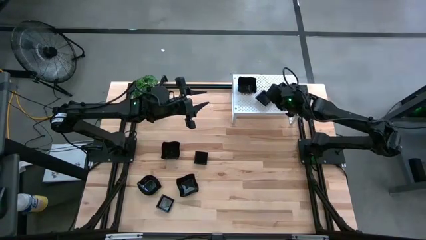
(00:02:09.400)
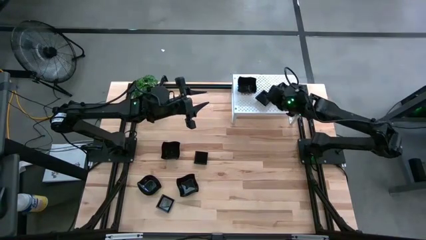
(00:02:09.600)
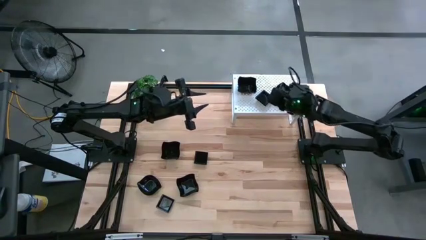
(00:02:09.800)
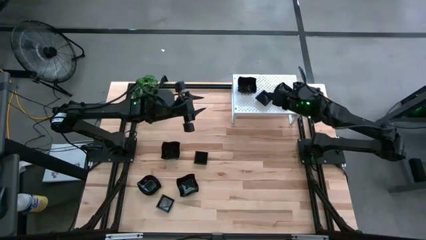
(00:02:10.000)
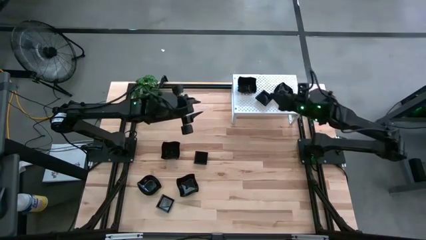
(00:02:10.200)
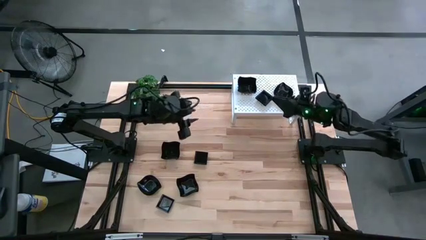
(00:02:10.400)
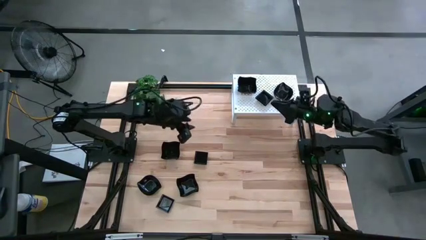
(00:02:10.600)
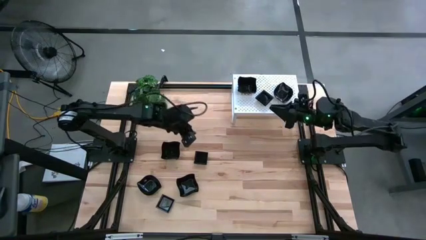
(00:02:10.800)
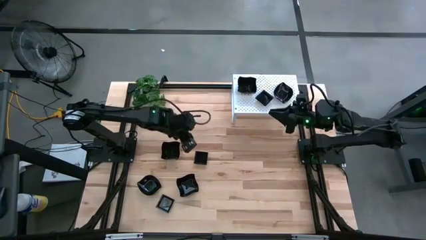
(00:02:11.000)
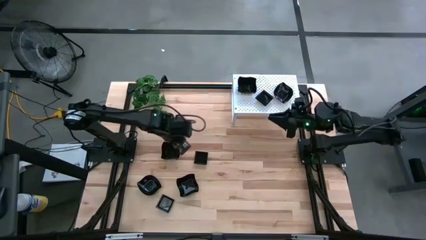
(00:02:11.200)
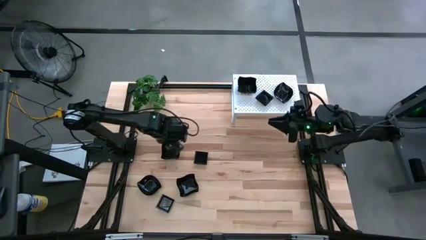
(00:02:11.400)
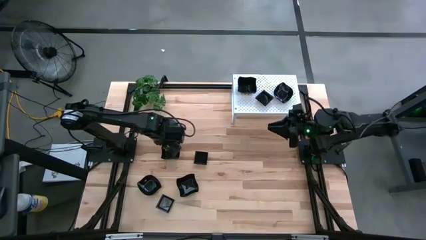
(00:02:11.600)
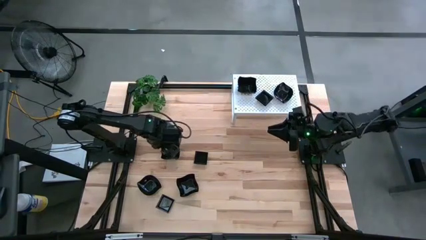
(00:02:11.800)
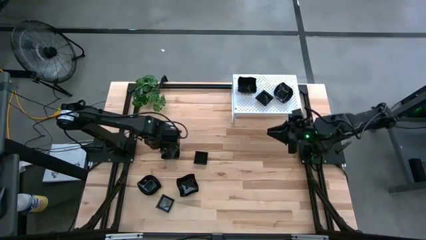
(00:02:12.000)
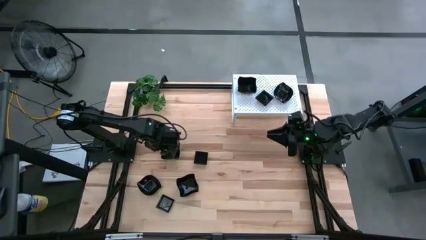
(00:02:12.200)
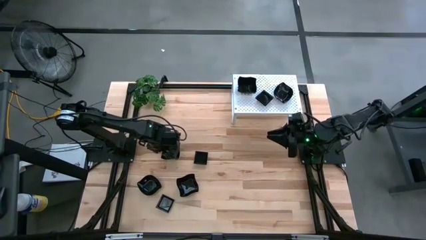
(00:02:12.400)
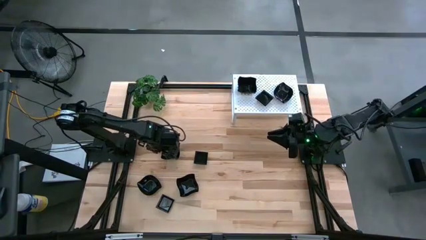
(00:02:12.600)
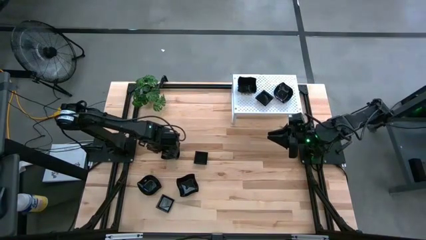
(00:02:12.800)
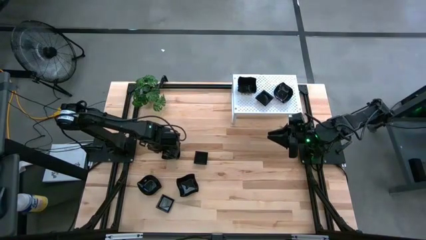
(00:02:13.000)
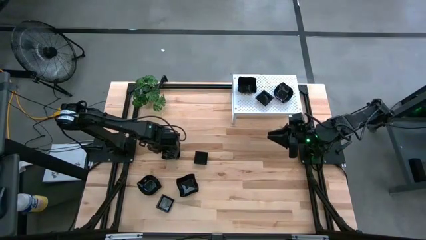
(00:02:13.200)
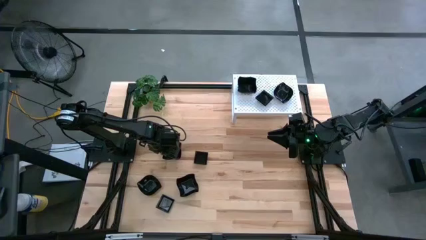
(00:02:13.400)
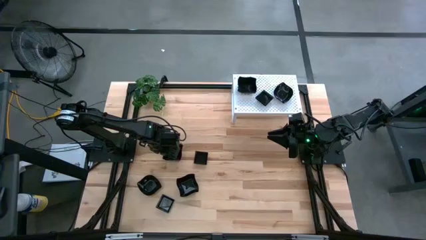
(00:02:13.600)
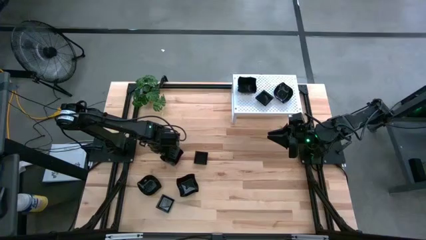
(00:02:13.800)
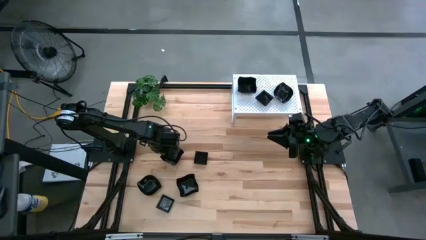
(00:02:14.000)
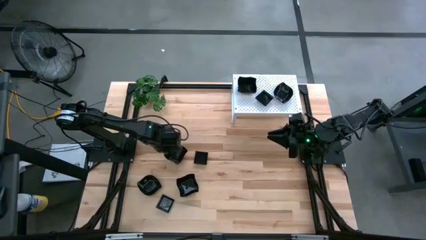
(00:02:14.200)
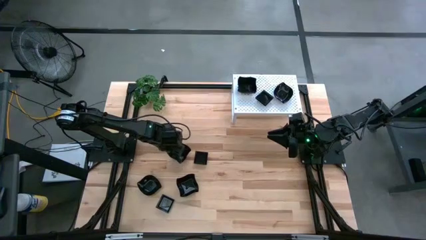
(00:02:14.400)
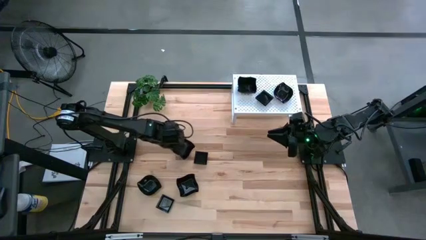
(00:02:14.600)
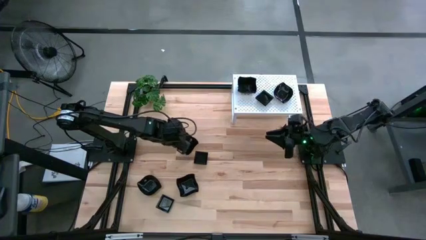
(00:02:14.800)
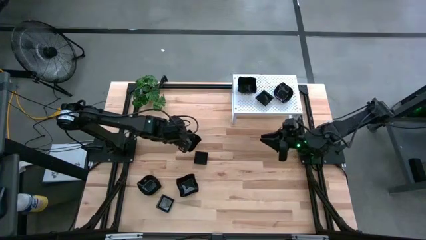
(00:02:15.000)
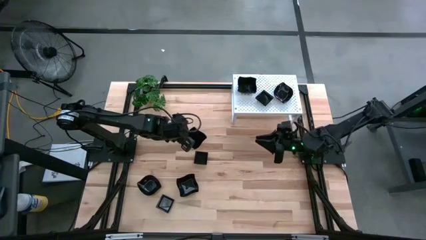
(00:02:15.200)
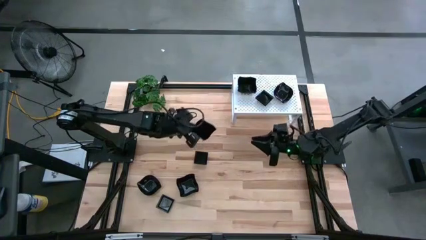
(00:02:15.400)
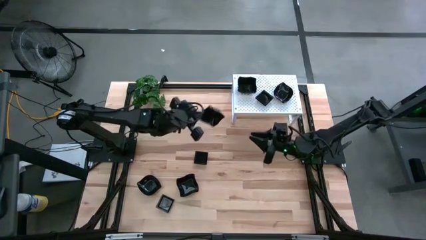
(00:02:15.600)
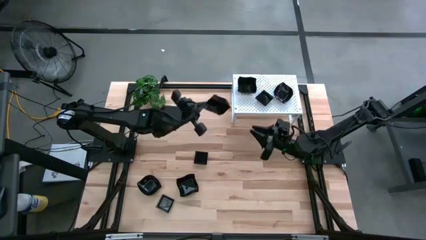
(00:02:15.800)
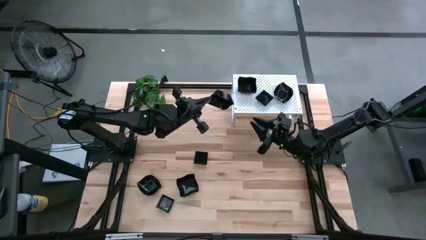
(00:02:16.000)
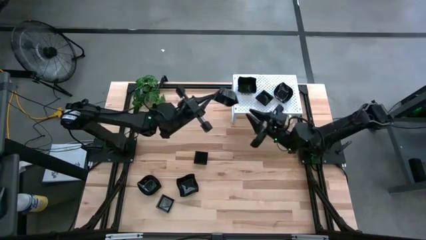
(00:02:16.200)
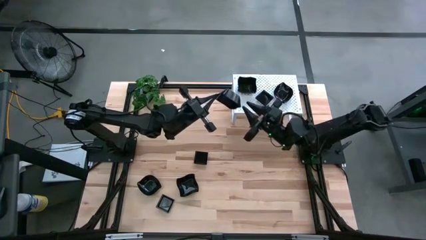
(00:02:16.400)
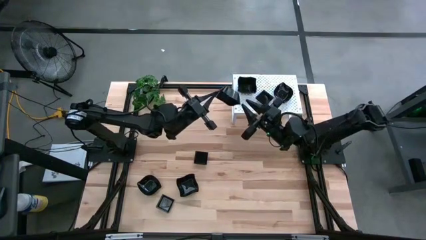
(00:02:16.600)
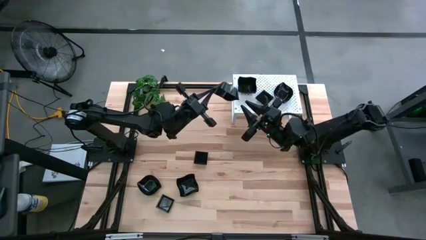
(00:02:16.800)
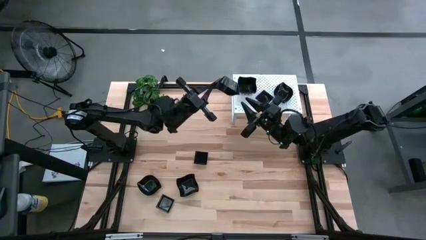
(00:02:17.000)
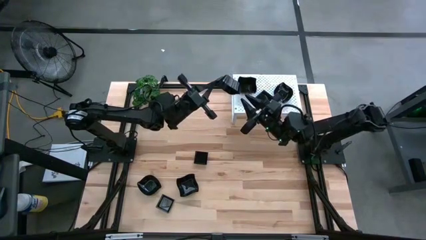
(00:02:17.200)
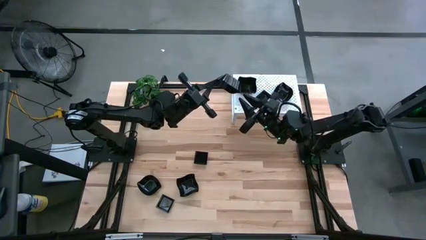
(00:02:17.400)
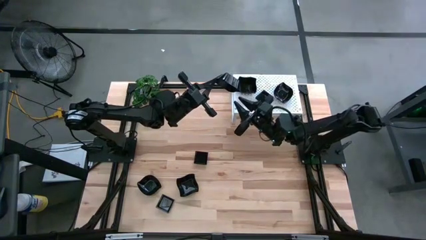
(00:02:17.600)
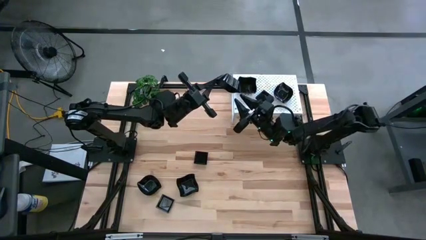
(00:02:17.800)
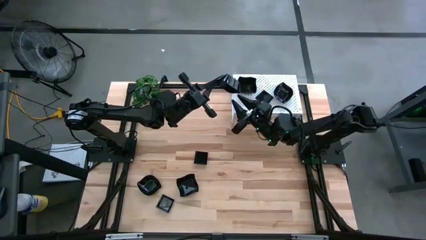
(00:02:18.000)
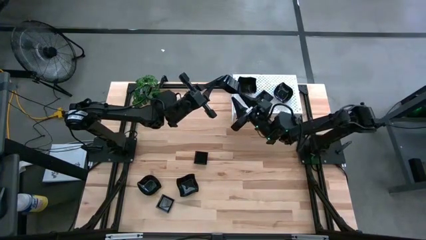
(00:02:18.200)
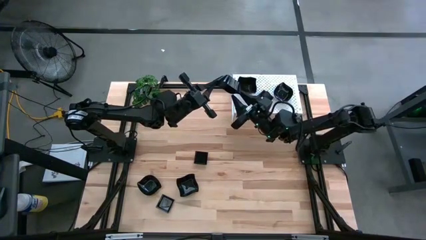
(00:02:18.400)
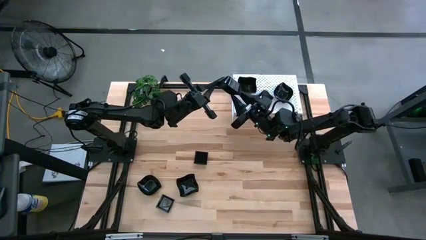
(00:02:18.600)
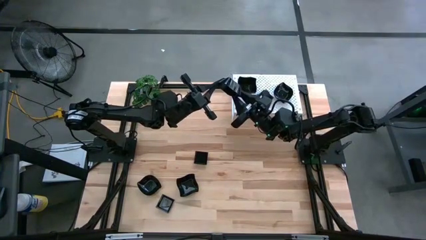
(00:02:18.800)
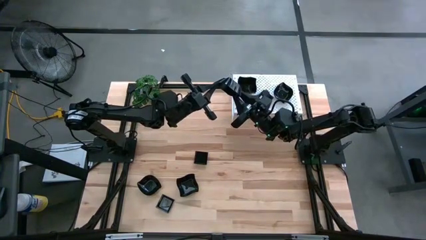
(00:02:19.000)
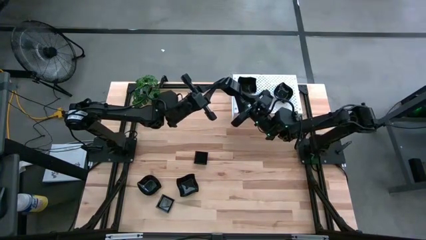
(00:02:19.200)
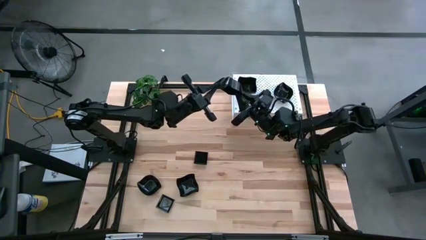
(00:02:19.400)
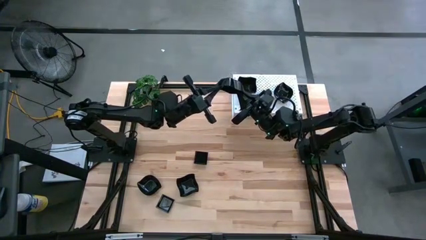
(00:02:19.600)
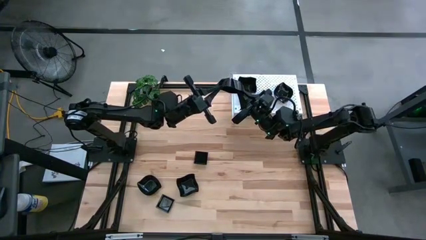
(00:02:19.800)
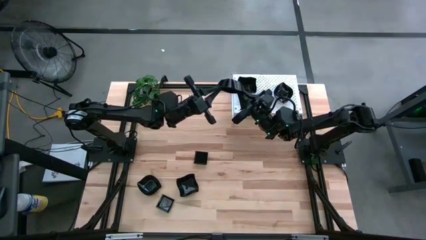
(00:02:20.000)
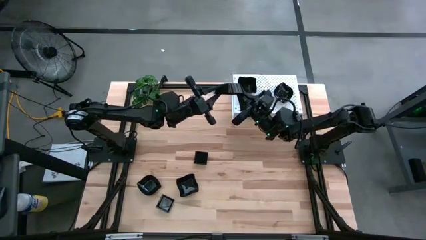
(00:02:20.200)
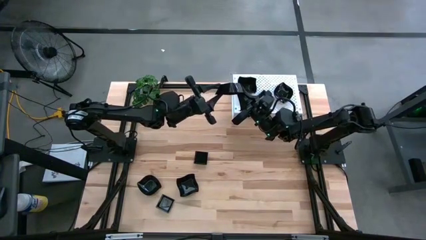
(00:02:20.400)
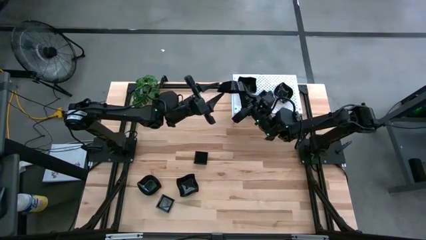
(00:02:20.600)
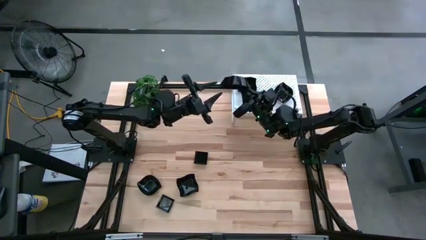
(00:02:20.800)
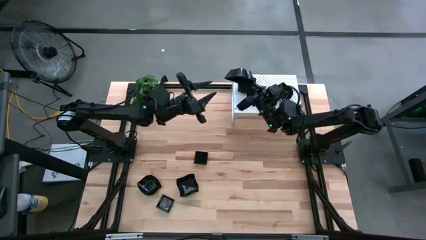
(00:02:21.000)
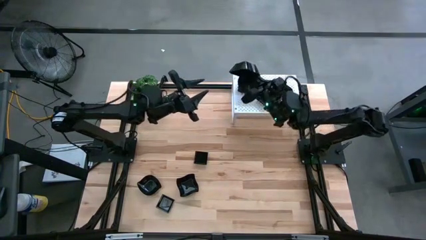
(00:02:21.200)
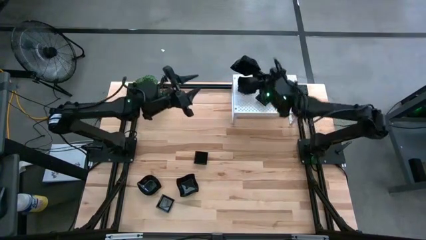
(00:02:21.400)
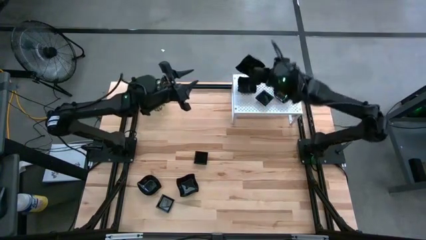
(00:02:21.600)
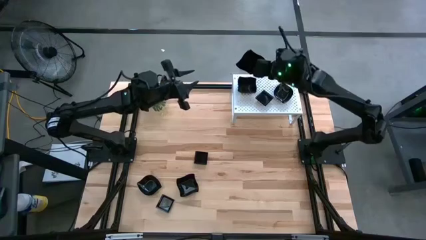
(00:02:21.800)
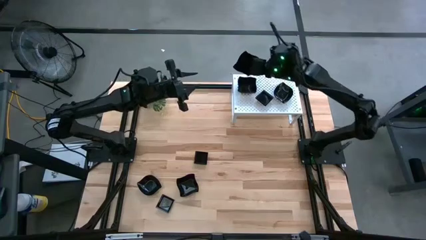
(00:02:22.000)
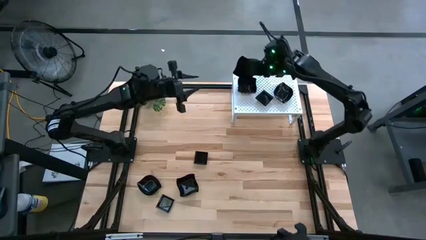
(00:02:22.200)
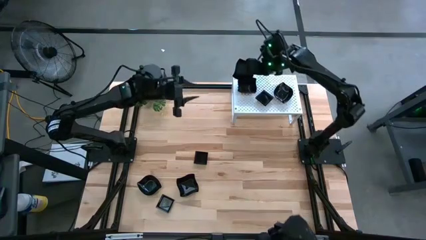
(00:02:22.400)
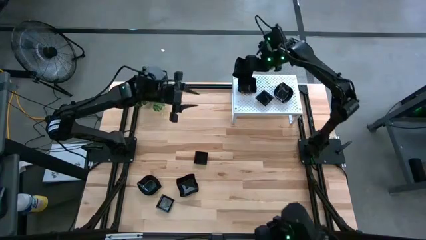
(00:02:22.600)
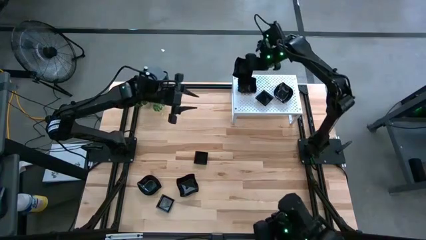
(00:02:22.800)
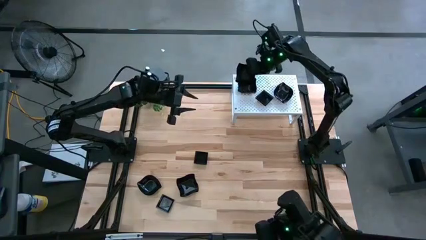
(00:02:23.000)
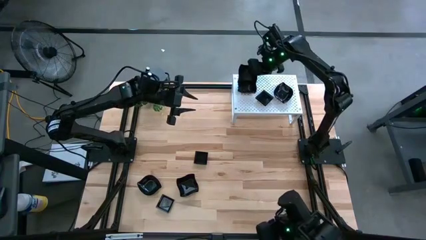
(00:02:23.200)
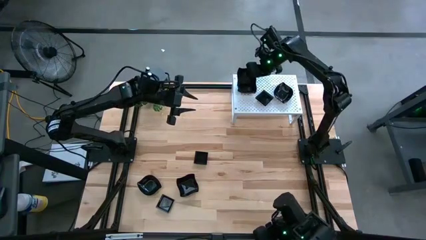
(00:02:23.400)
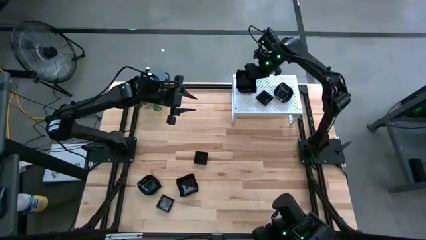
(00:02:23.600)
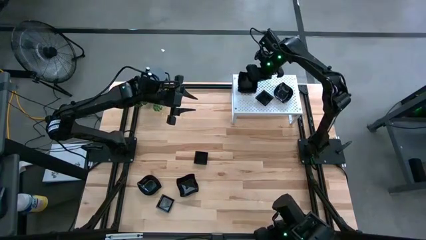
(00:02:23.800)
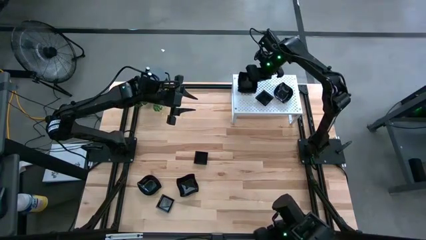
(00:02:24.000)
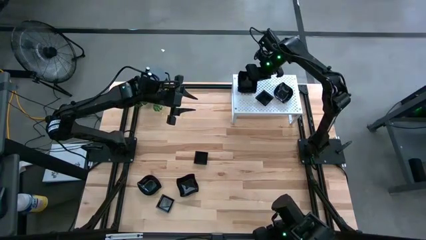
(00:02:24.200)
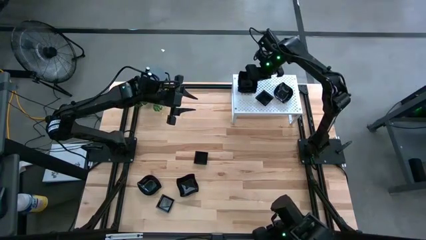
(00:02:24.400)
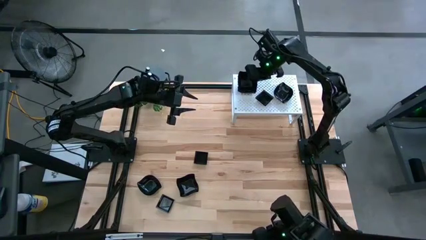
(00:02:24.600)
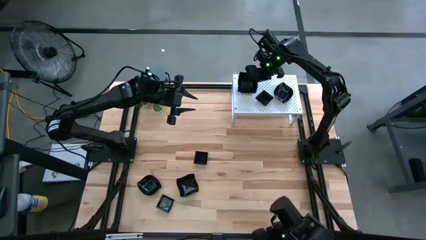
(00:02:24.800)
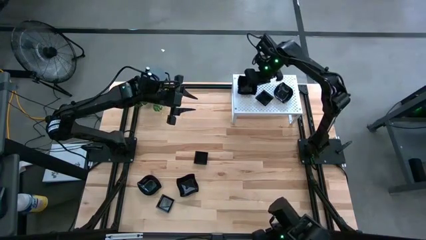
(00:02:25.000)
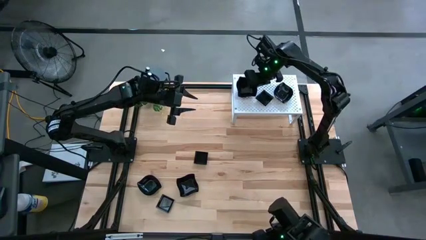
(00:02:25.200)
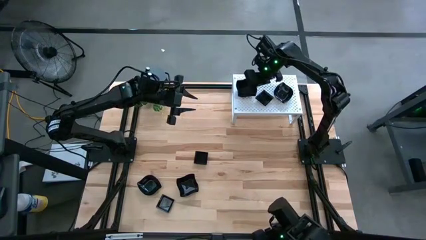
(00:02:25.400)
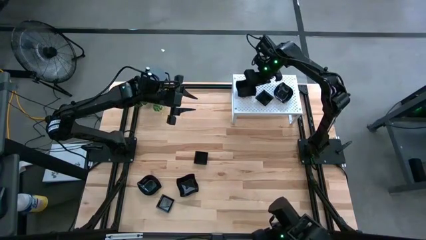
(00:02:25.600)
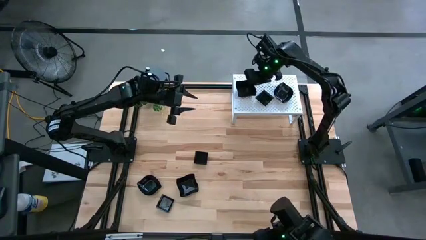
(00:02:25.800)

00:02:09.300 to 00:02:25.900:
Task: Pick & Place Mini shaped plates
Stack the distorted square plate on top of the distorted square plate on the shelf
